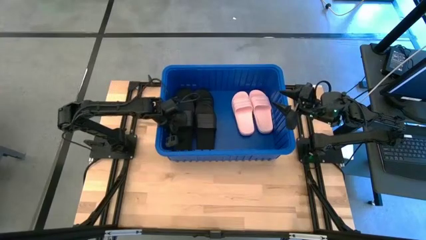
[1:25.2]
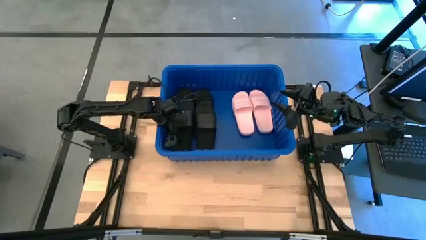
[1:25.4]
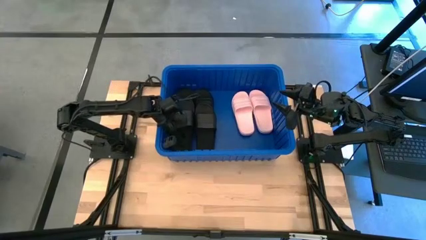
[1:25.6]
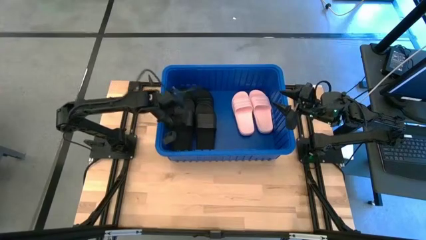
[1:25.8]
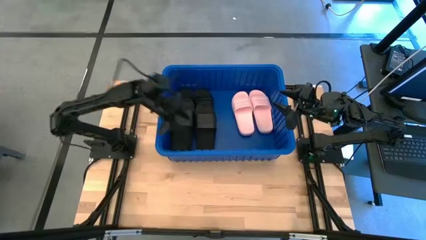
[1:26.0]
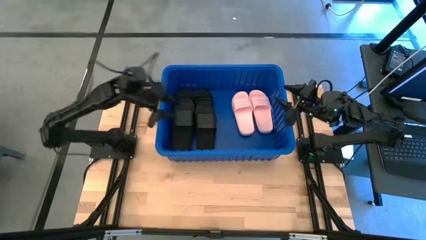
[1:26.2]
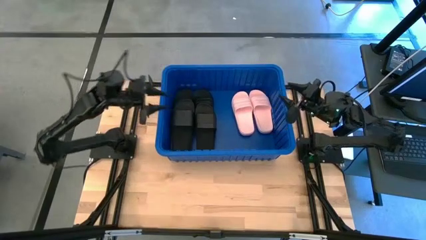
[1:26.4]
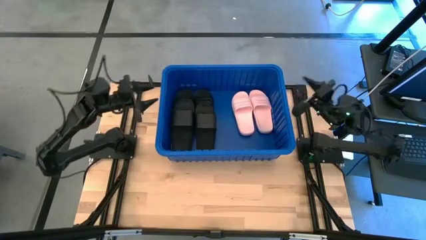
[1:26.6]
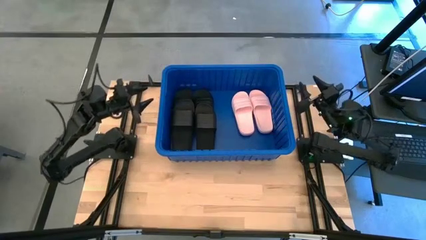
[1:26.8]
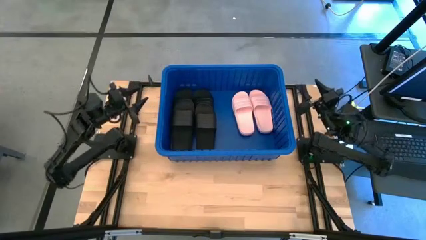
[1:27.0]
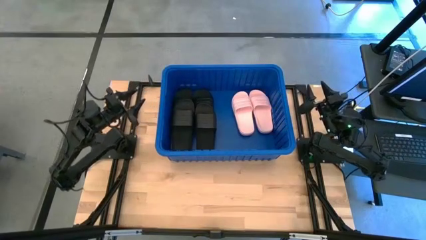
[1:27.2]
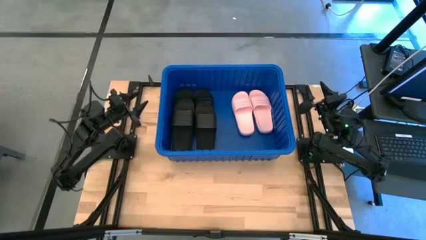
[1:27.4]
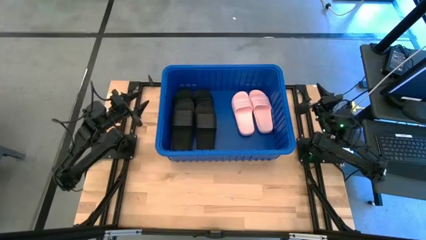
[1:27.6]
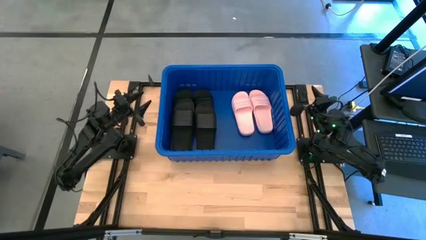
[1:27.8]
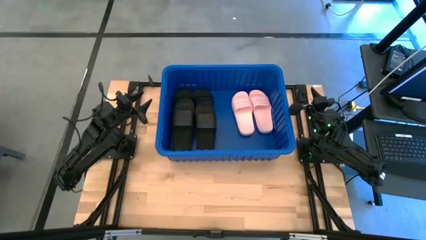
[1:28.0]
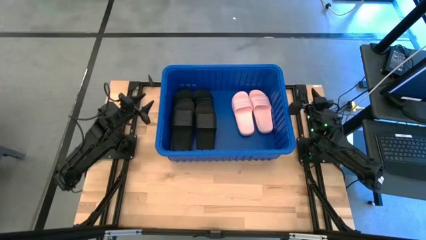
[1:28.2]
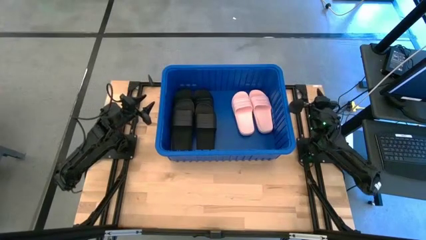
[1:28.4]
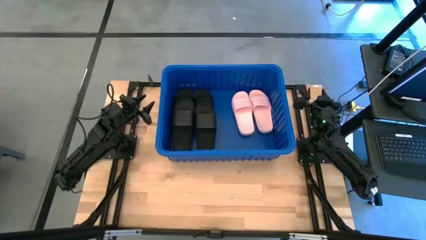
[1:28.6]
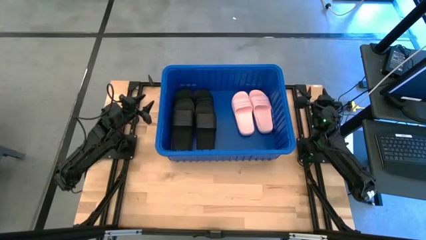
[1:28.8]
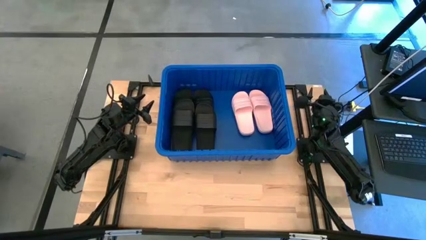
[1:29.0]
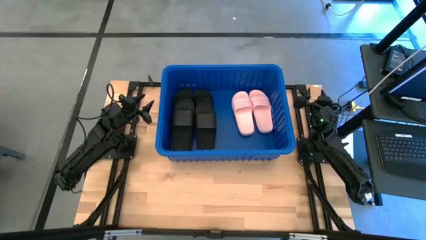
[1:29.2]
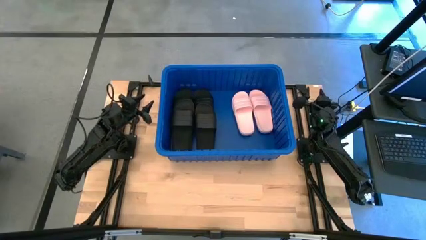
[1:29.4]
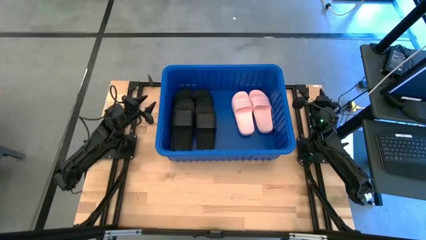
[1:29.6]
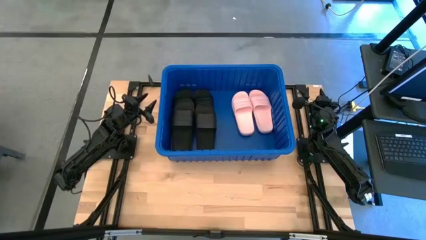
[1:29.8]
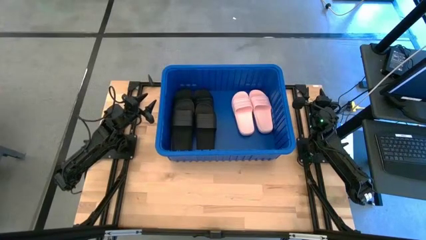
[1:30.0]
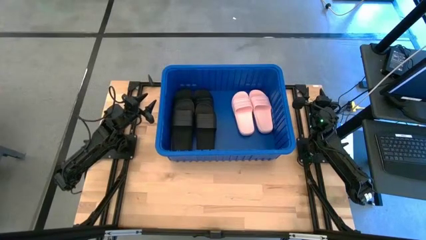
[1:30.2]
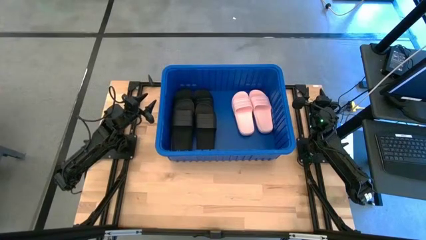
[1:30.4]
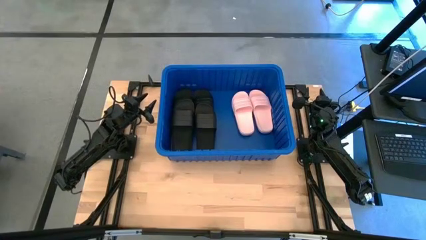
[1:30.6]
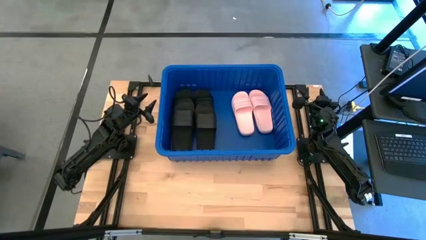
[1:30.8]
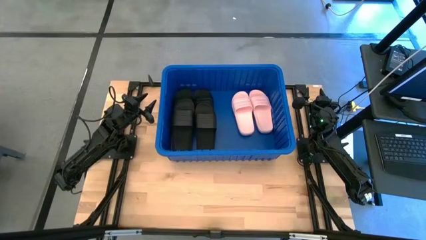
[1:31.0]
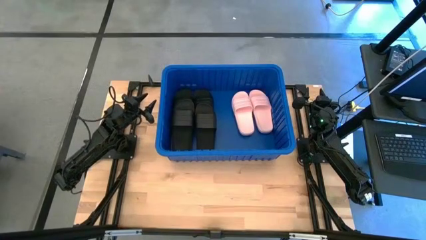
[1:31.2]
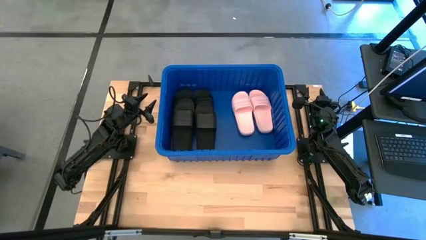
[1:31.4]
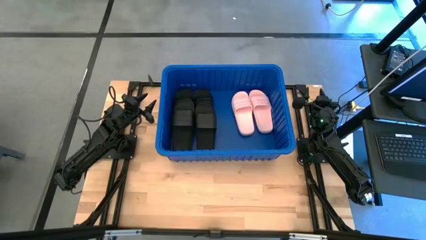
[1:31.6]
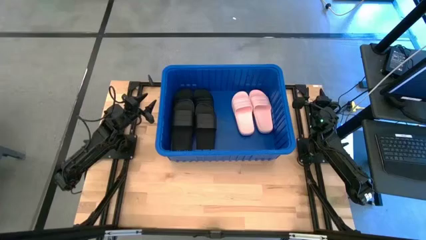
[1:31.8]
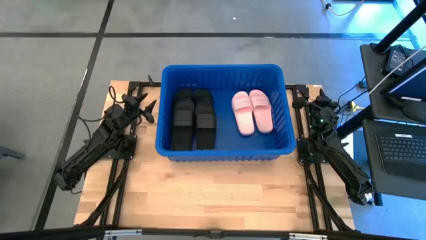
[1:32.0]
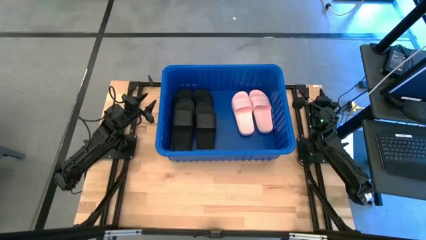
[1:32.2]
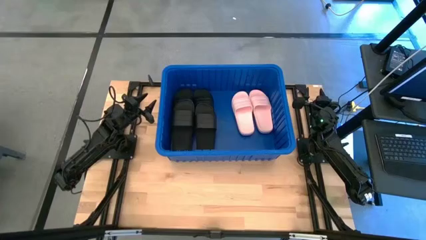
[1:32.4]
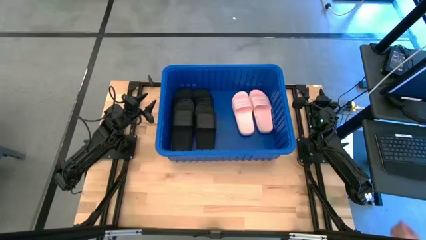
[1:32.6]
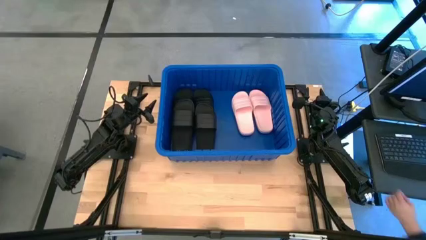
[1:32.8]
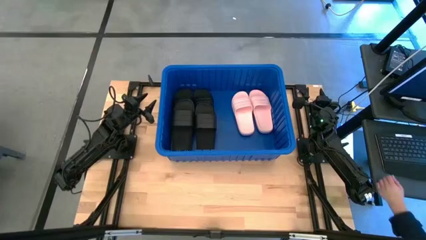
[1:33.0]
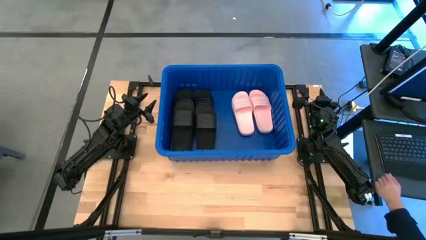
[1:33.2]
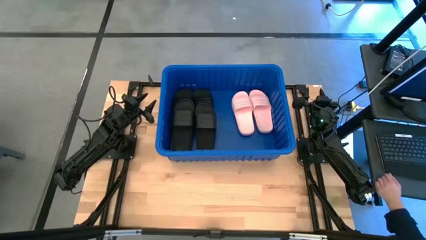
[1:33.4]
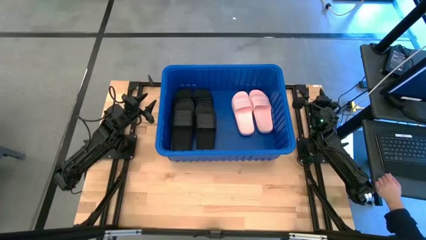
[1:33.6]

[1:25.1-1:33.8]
Task: Pick and place slides into bin
Return to Home Position

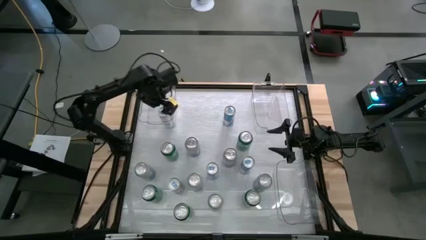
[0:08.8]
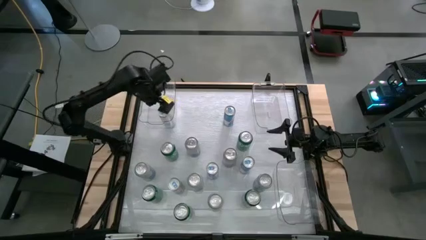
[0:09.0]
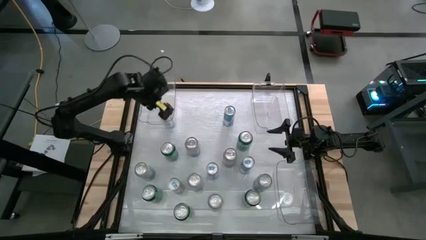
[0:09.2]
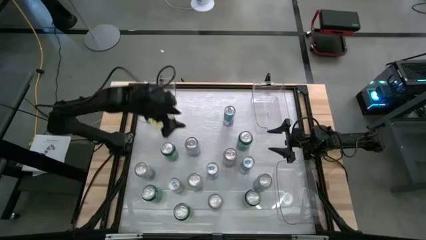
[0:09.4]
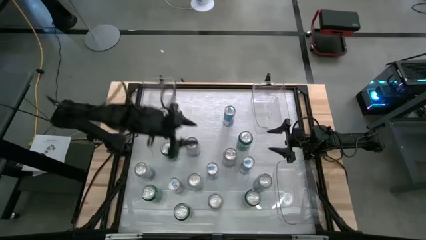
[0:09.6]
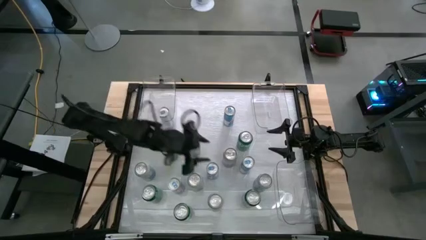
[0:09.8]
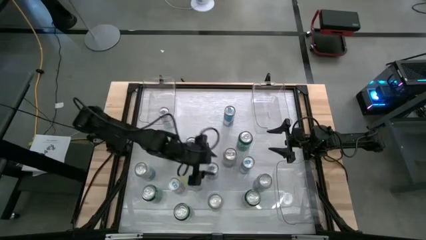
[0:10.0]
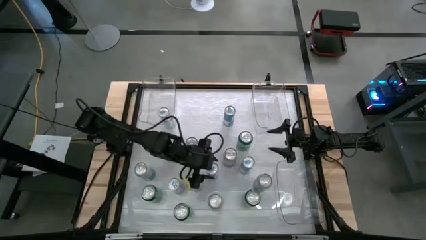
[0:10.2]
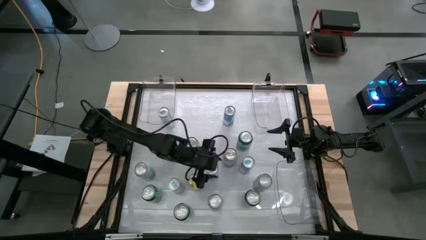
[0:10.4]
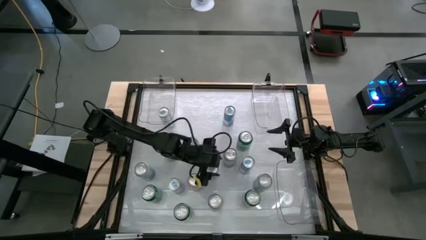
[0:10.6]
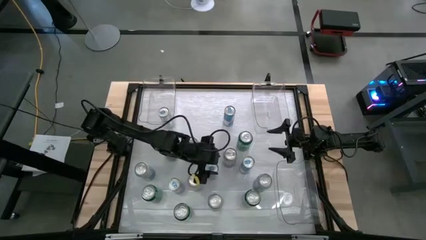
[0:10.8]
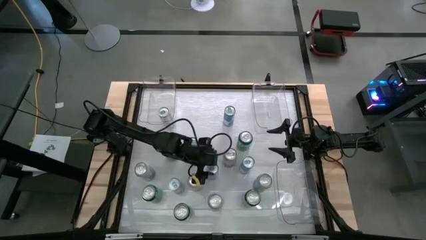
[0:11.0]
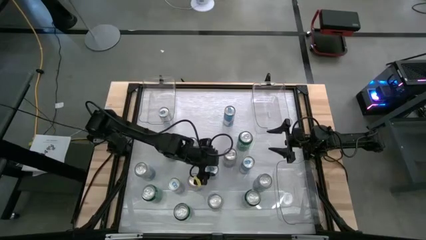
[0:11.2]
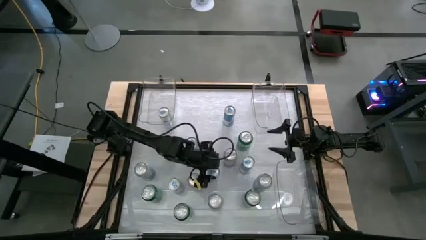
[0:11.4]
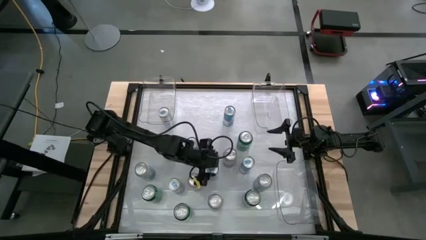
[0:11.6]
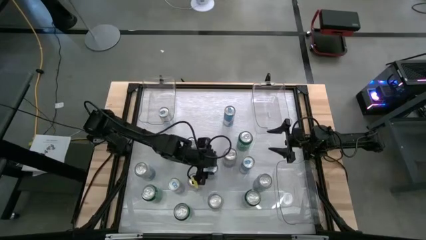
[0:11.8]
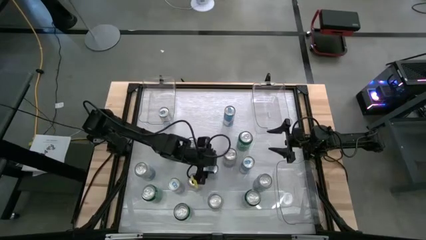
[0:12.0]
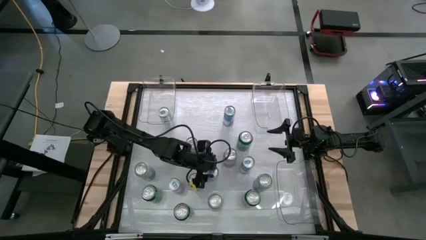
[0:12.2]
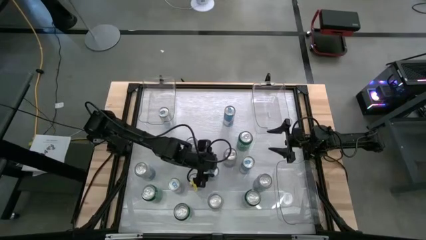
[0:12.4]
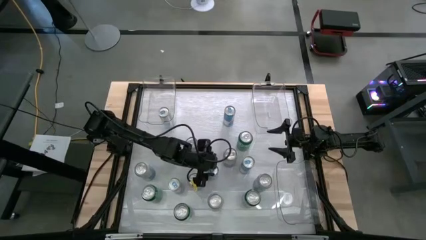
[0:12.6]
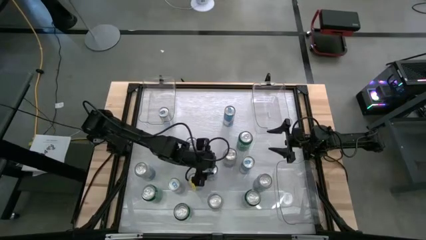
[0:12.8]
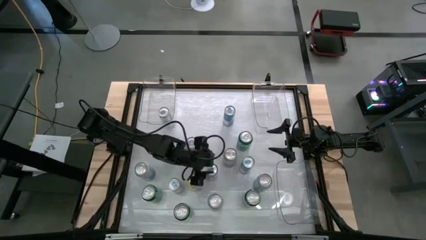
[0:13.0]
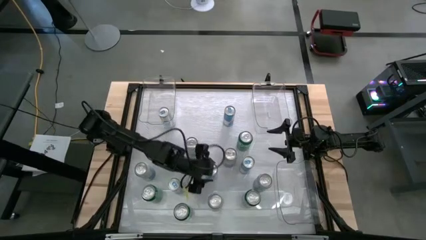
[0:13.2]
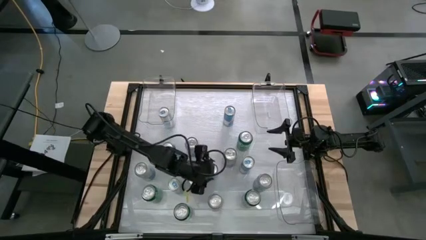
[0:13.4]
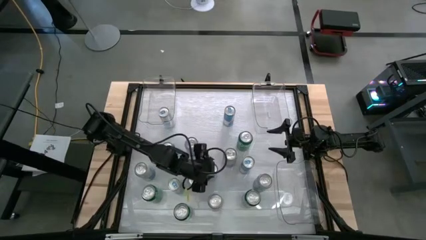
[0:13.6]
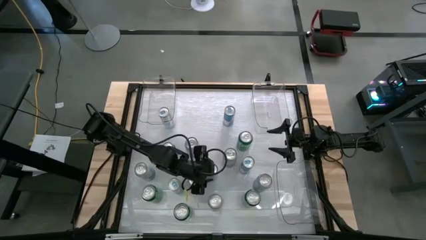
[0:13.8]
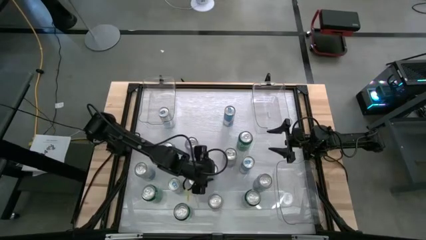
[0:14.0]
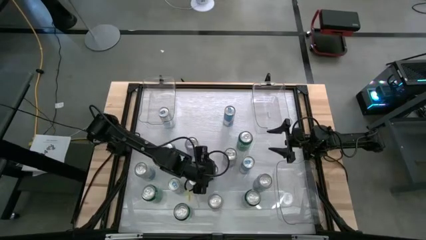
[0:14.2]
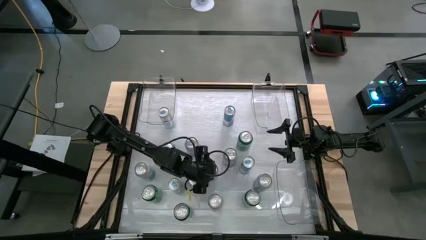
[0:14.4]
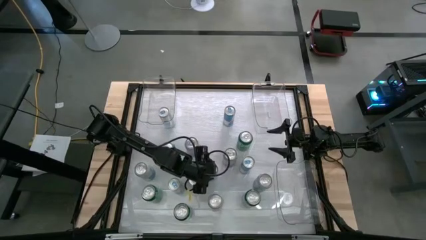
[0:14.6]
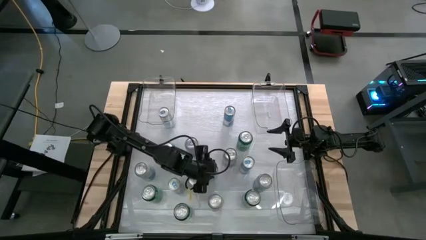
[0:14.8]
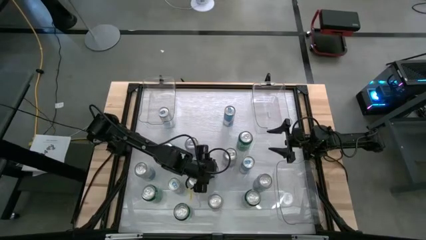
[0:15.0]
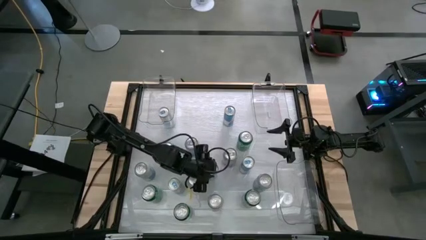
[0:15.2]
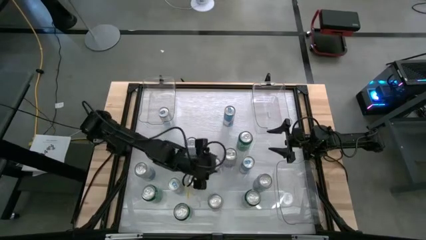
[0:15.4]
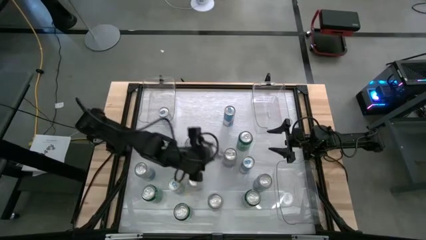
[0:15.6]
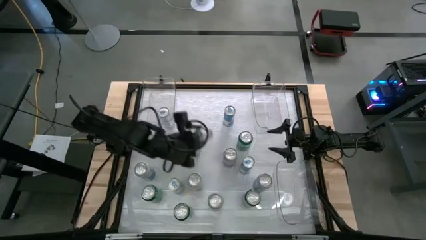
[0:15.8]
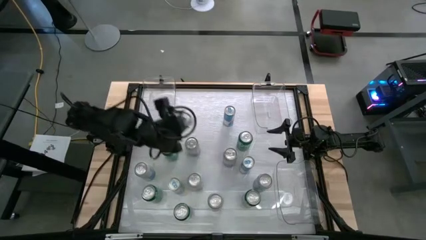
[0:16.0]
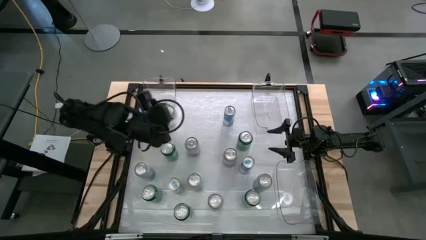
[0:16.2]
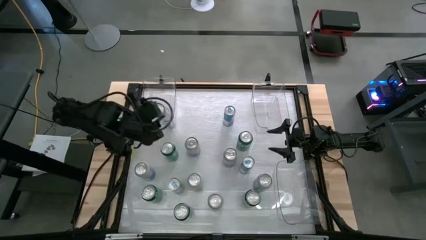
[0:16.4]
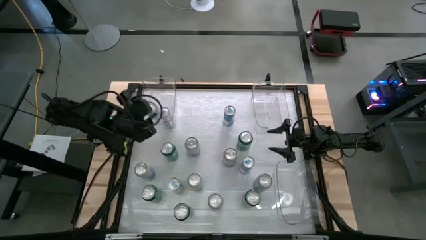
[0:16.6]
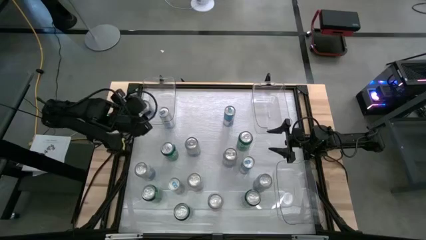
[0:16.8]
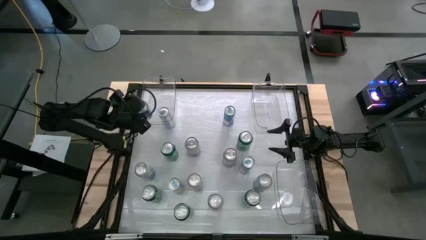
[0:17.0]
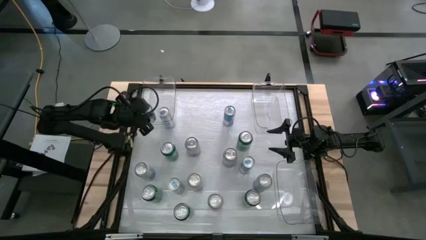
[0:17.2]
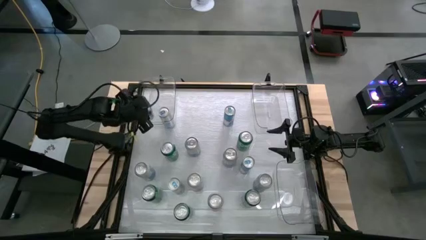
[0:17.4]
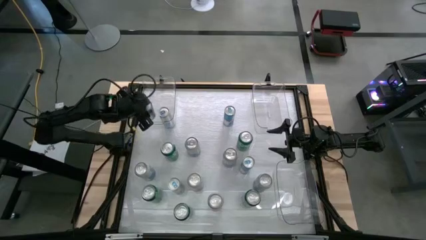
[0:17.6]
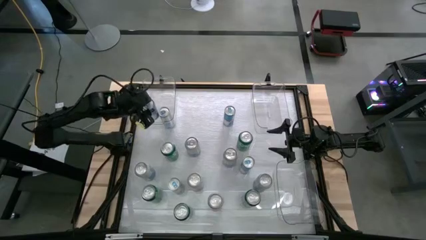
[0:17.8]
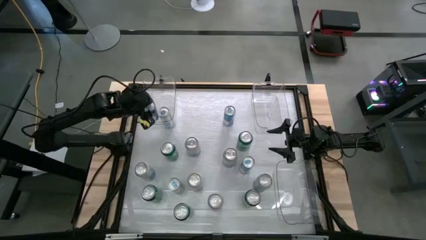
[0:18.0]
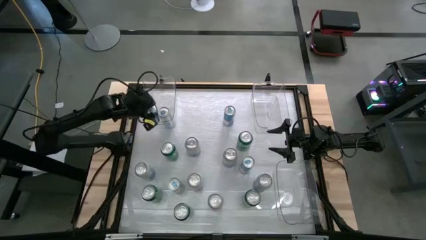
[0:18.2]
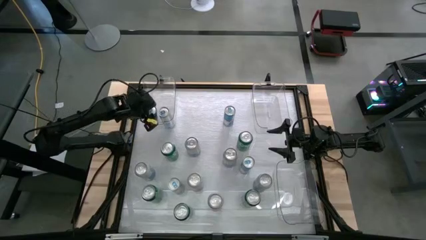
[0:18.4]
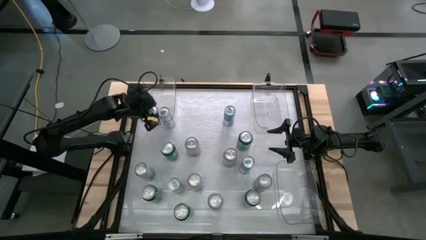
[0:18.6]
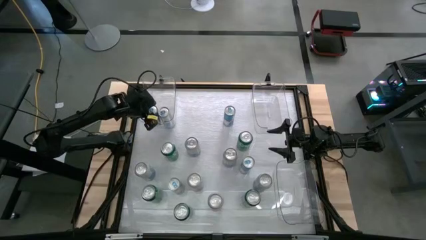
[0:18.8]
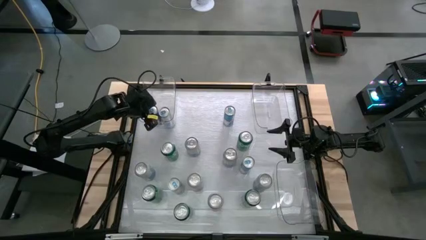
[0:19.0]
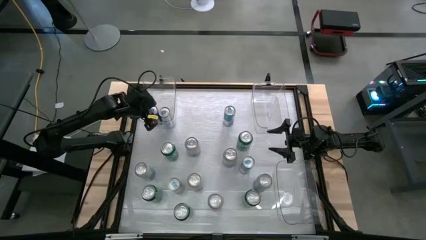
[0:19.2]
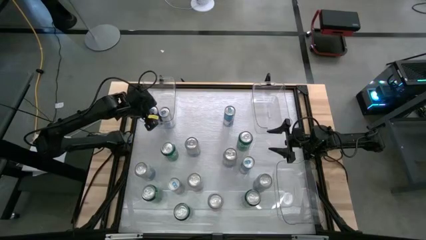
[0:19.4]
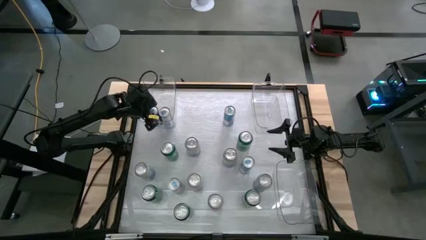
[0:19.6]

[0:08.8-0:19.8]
Task: Sort soda cans
Put the blue soda can into the top left transparent bin
